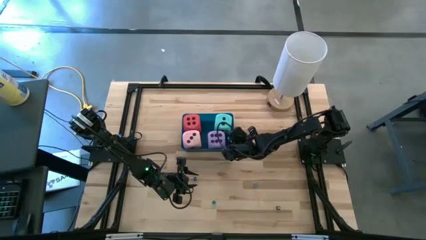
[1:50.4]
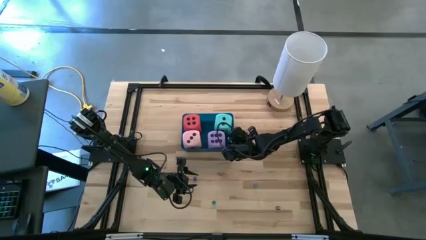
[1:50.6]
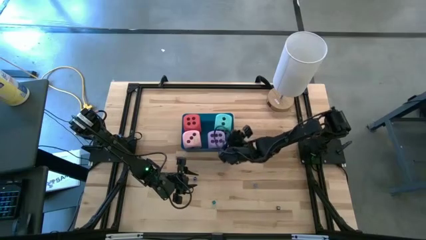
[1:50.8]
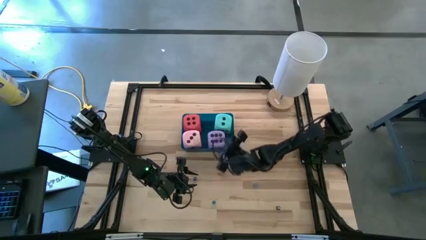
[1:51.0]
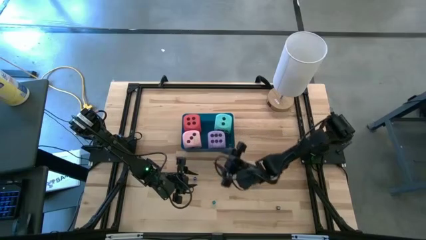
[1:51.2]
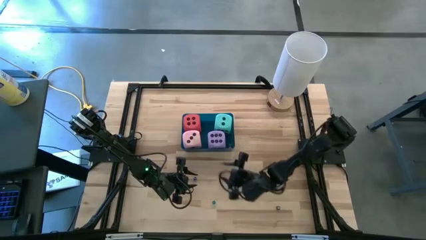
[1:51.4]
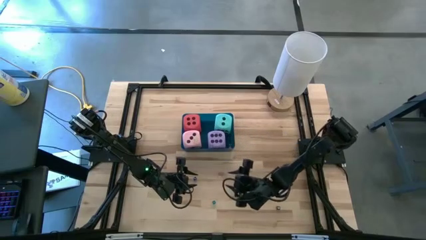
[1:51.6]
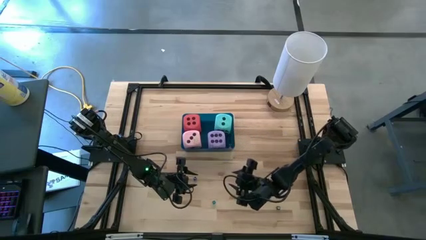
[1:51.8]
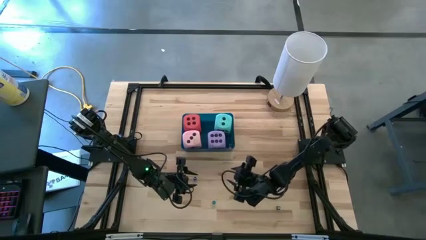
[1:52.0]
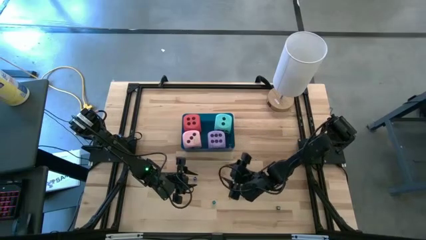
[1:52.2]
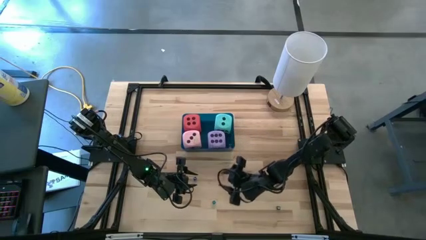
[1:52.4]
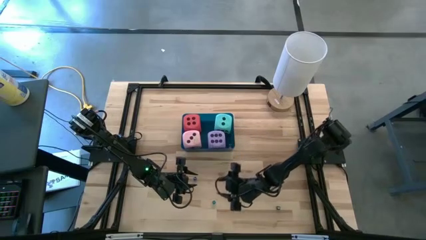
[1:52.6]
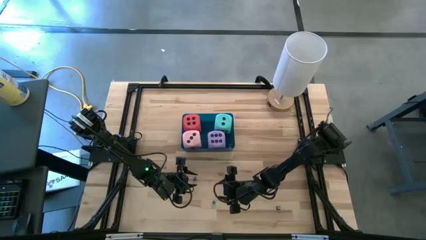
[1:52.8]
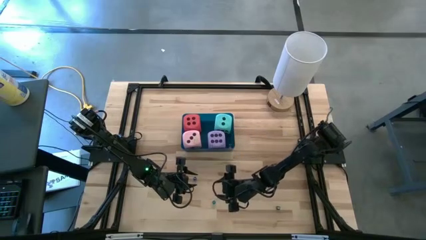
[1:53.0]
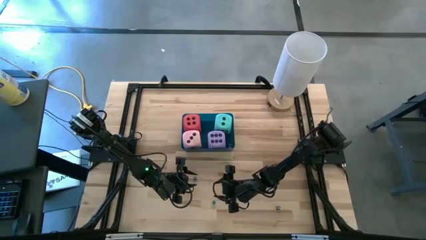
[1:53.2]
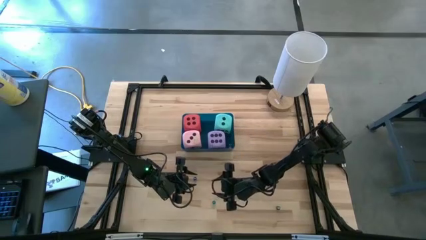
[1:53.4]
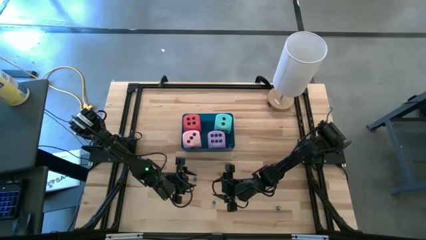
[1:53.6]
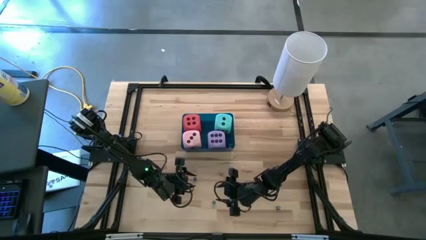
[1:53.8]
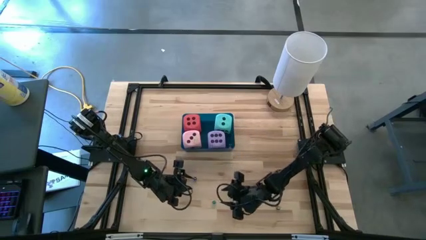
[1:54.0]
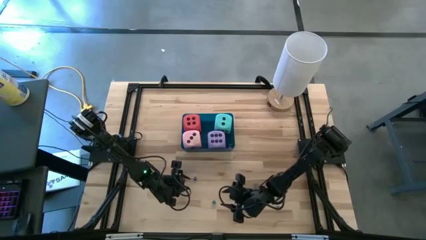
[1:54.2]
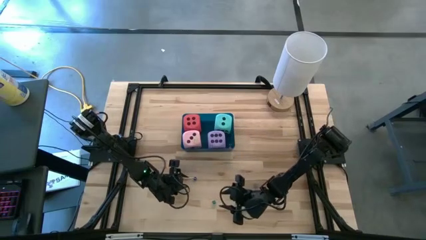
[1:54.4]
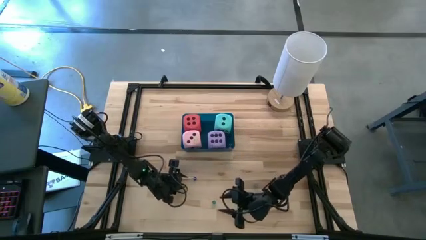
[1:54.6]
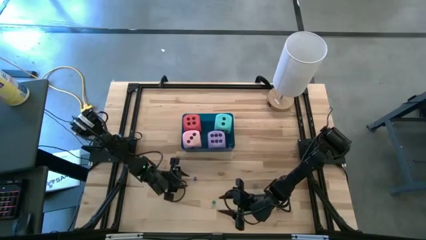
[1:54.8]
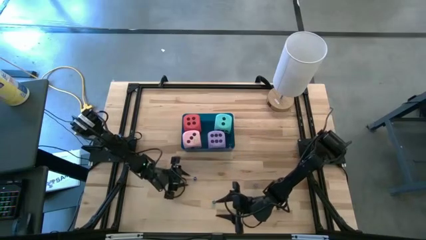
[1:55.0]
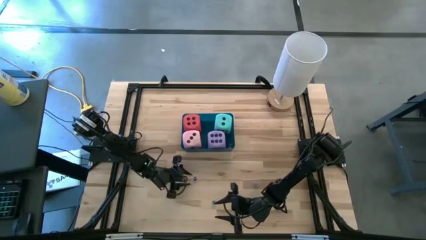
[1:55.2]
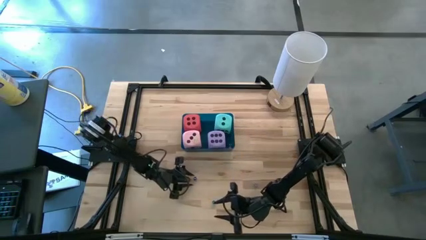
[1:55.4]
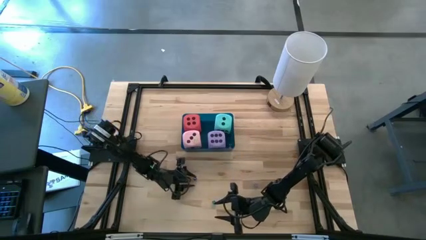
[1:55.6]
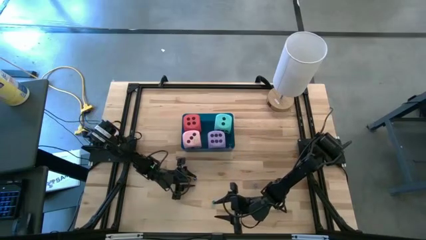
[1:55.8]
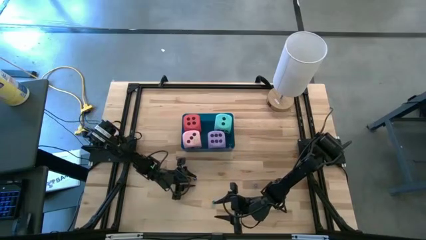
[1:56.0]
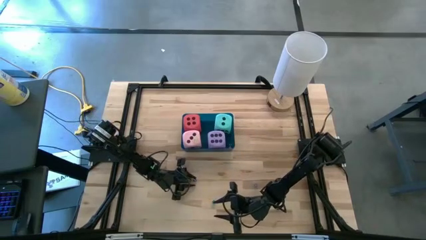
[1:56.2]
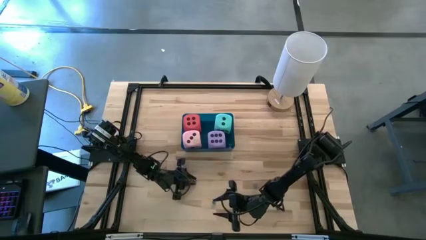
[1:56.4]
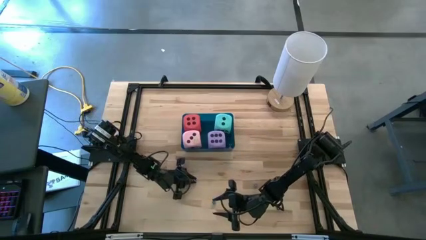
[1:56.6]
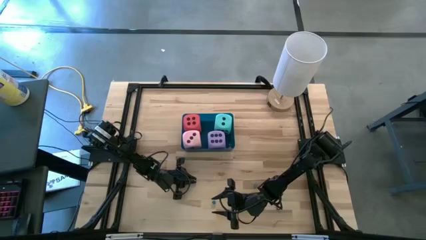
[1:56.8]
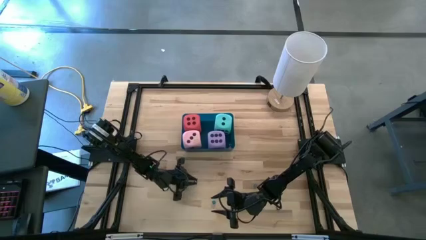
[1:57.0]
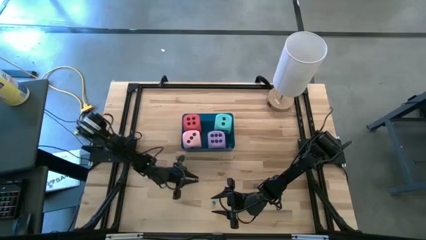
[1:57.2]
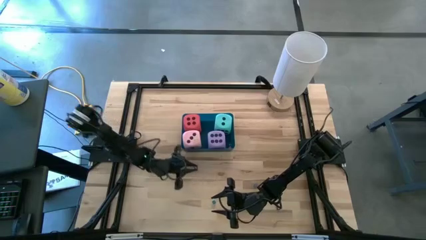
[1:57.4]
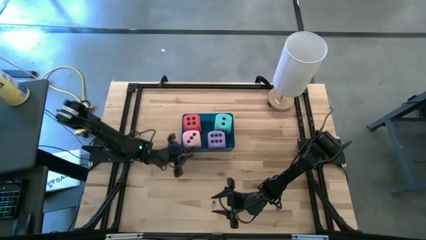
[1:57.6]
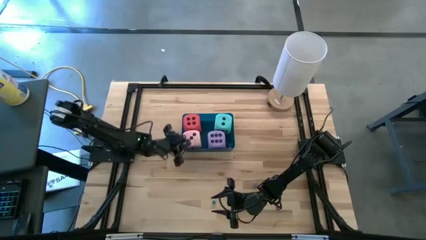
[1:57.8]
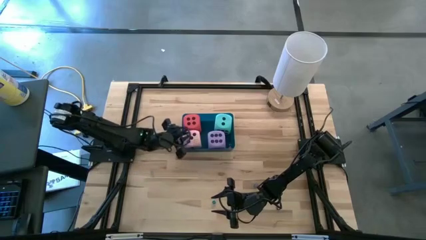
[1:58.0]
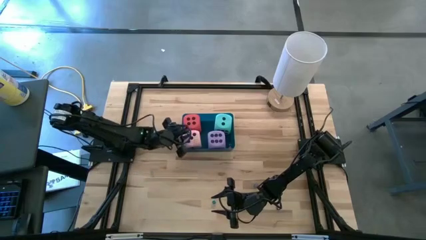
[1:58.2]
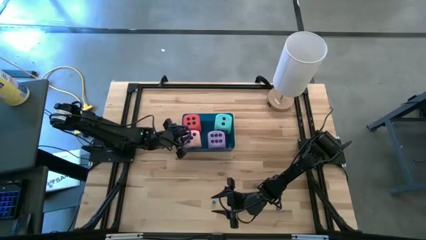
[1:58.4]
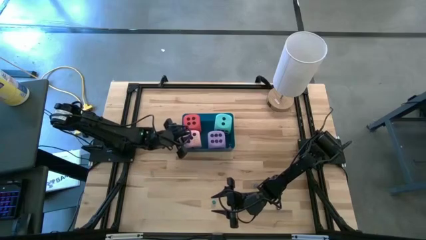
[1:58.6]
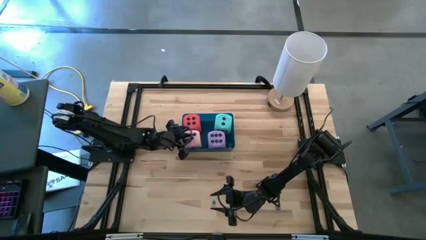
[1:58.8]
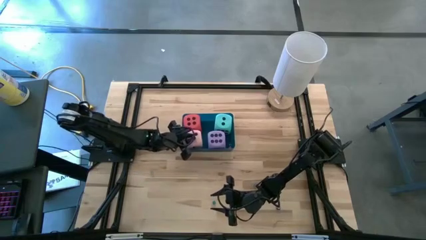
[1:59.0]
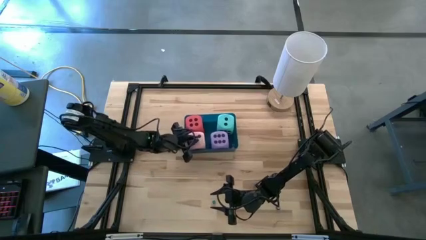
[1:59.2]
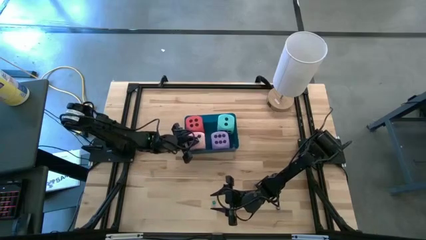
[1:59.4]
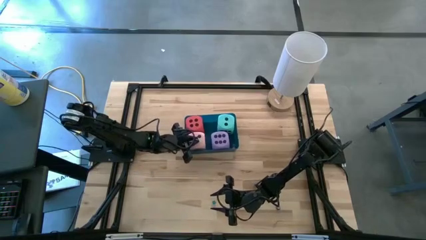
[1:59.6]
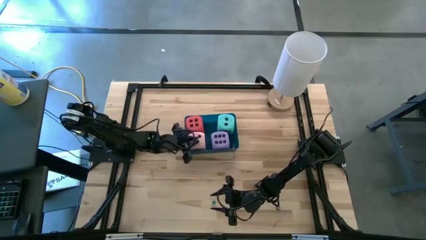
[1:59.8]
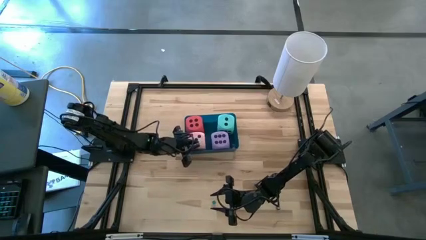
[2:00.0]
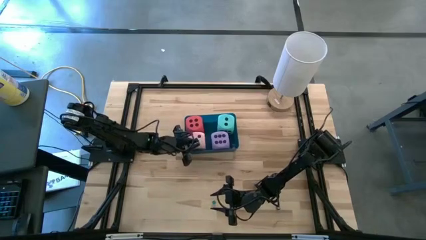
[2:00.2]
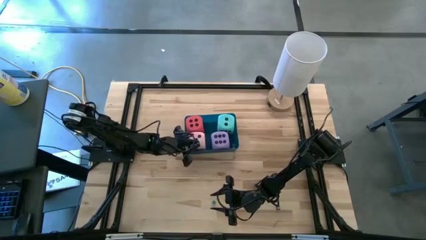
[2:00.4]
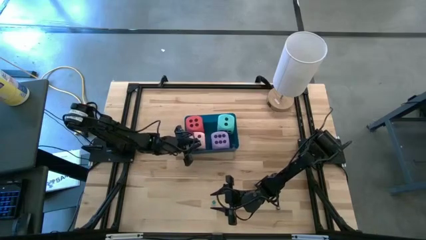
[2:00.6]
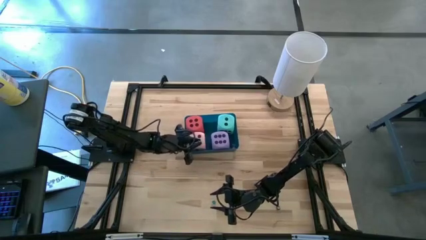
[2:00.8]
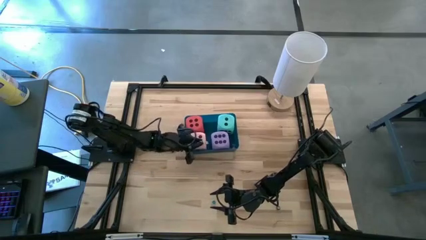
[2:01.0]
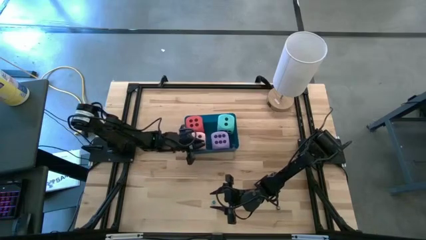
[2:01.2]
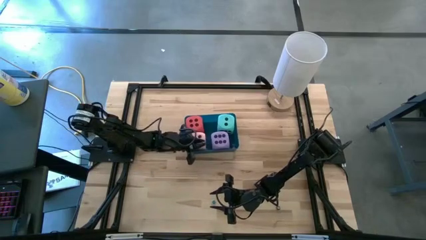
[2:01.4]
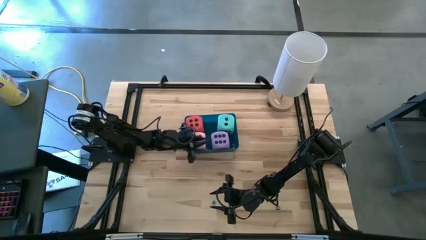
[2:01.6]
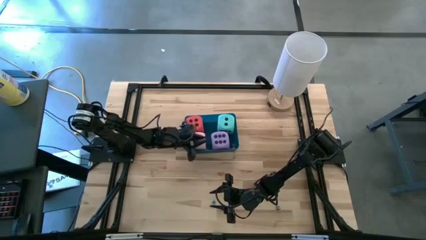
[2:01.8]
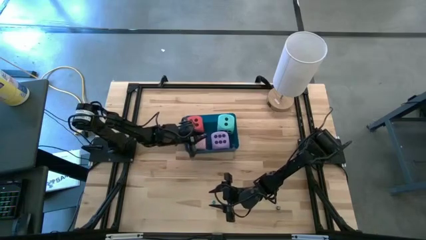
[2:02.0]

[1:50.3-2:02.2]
Task: Pick & Place Dice
Put the dark blue die into the blue bin
